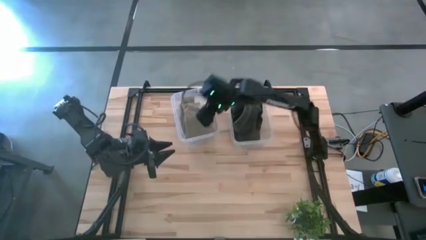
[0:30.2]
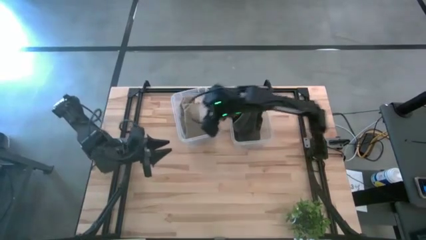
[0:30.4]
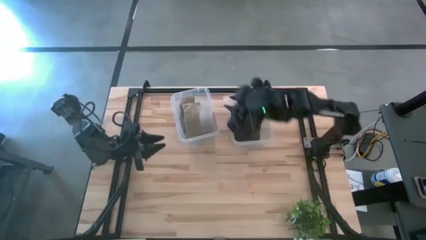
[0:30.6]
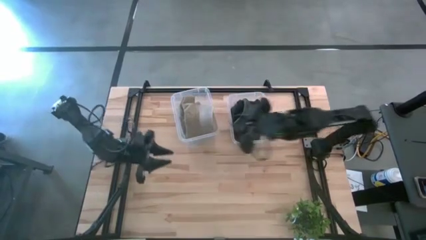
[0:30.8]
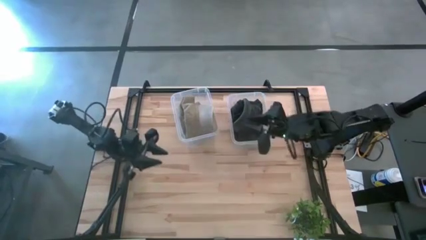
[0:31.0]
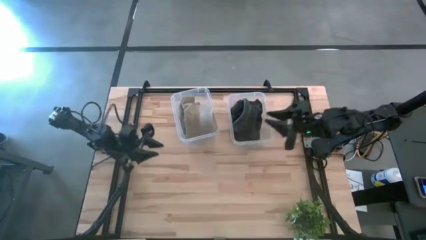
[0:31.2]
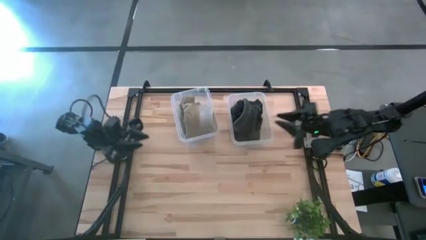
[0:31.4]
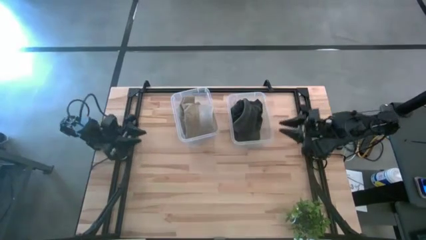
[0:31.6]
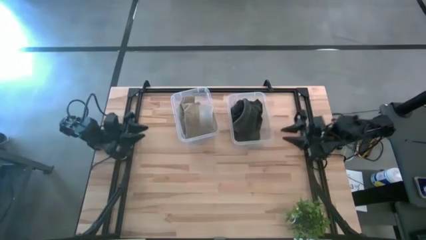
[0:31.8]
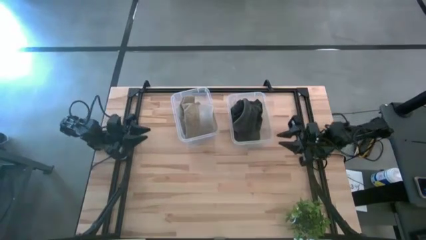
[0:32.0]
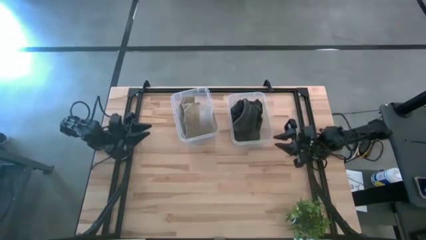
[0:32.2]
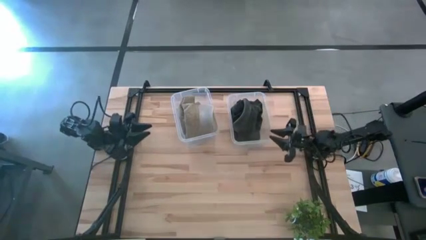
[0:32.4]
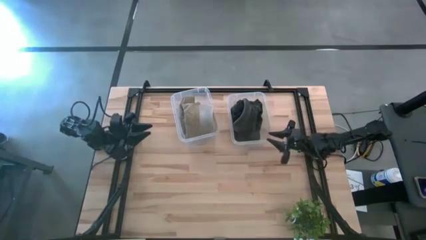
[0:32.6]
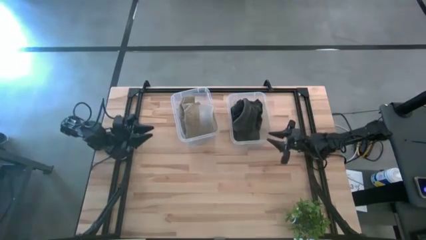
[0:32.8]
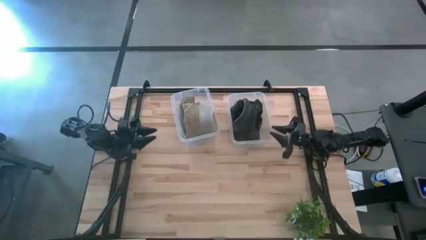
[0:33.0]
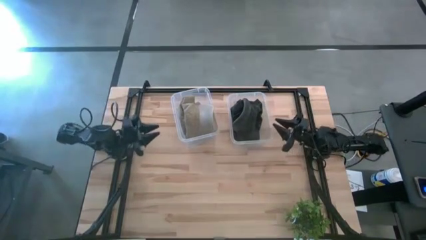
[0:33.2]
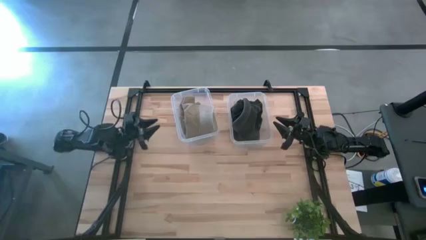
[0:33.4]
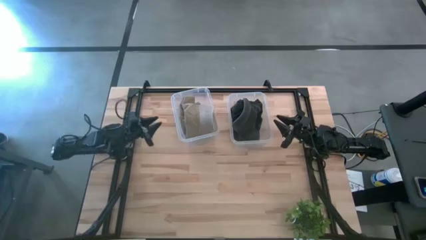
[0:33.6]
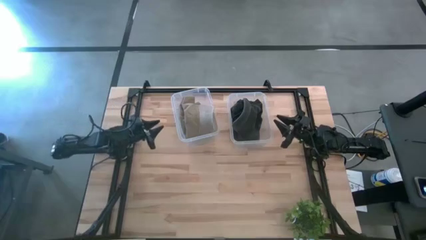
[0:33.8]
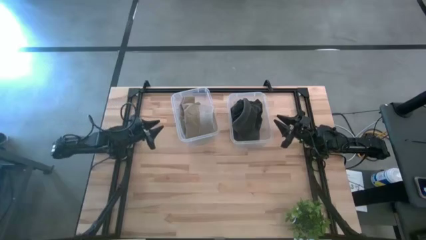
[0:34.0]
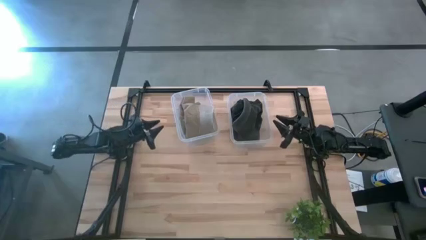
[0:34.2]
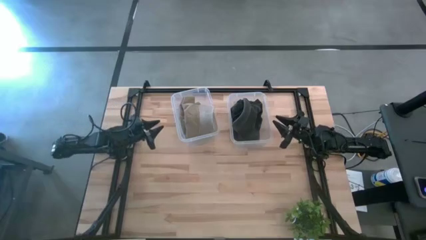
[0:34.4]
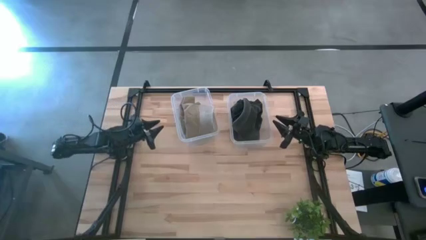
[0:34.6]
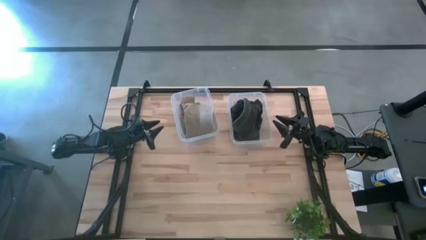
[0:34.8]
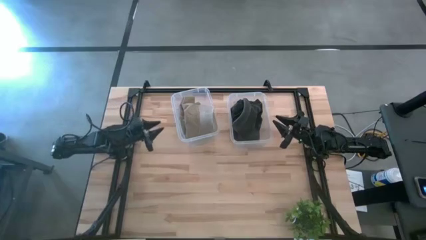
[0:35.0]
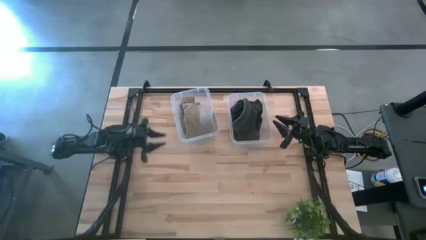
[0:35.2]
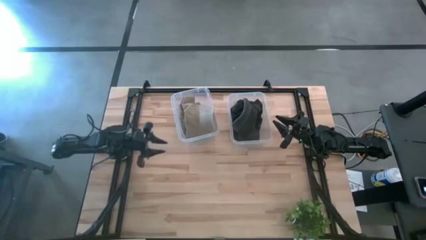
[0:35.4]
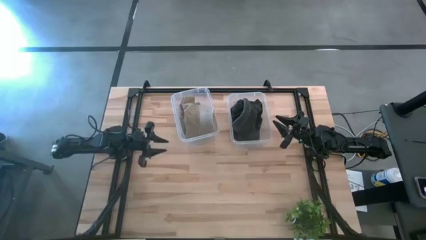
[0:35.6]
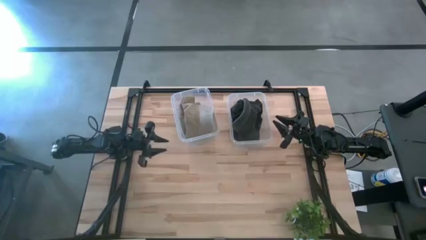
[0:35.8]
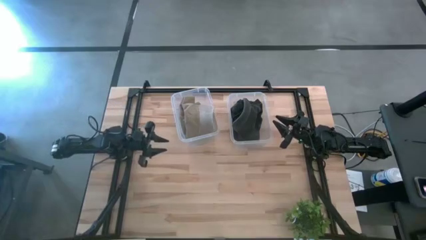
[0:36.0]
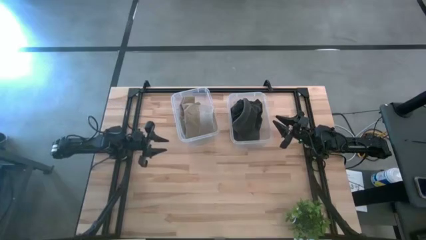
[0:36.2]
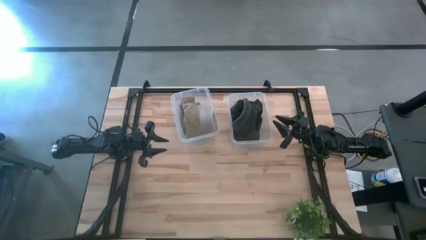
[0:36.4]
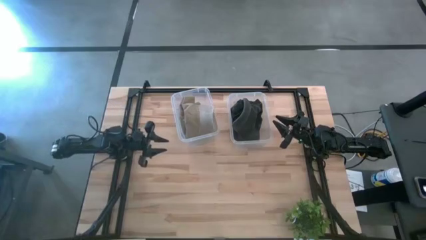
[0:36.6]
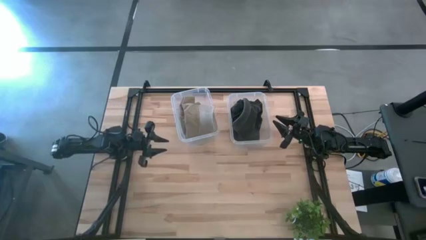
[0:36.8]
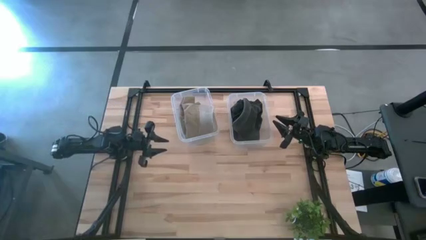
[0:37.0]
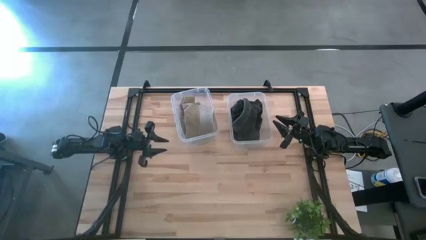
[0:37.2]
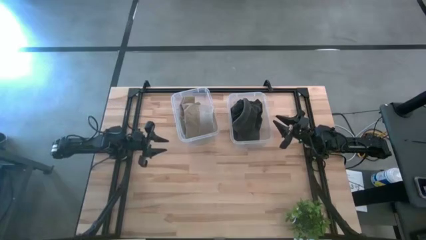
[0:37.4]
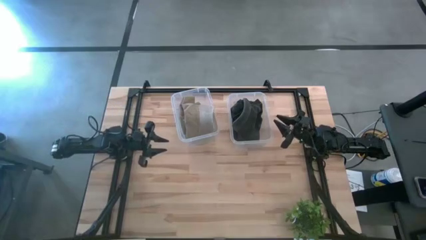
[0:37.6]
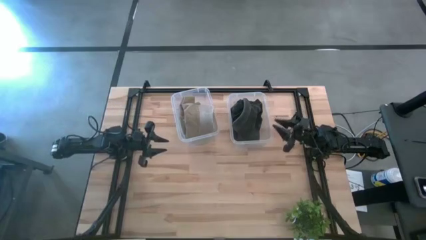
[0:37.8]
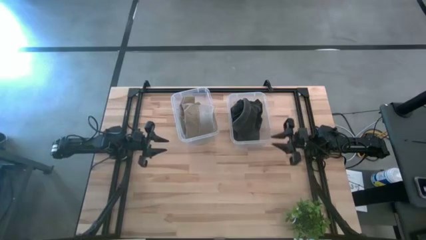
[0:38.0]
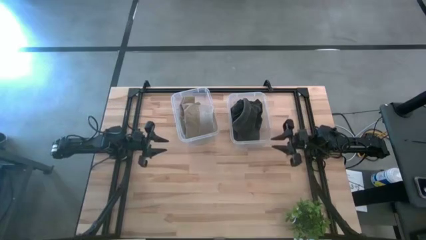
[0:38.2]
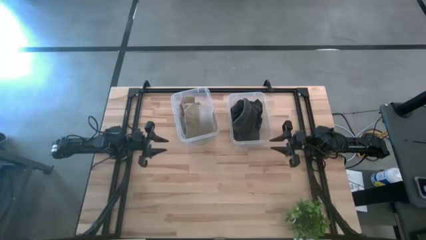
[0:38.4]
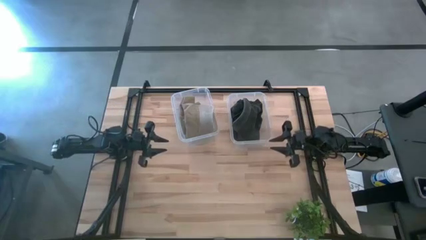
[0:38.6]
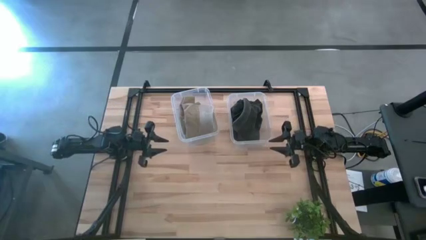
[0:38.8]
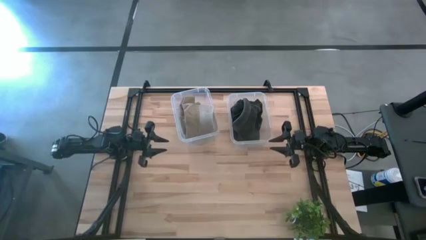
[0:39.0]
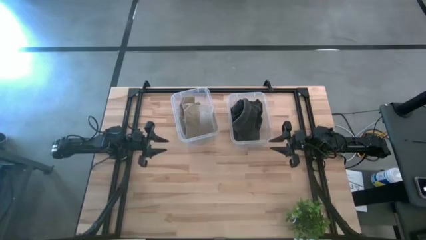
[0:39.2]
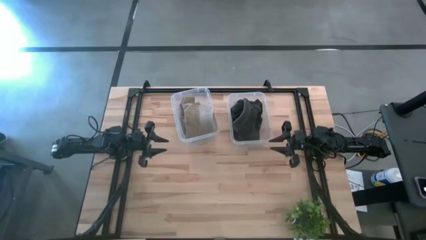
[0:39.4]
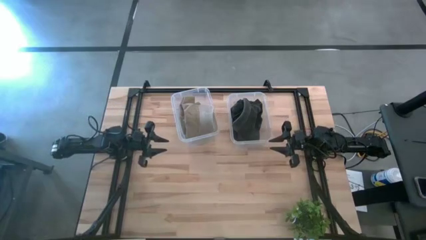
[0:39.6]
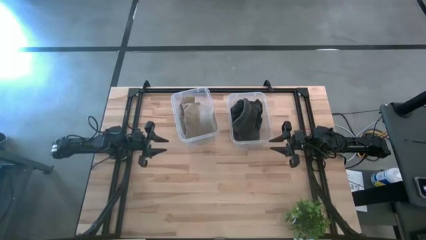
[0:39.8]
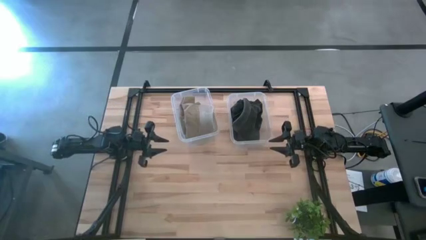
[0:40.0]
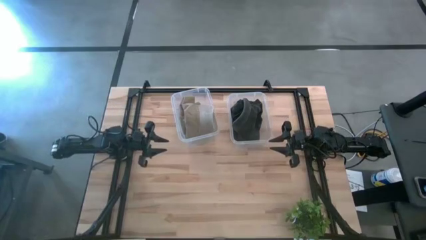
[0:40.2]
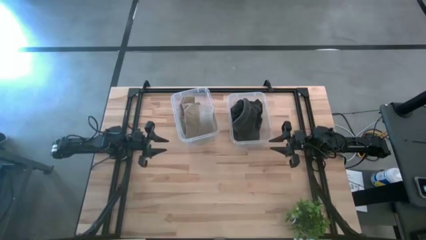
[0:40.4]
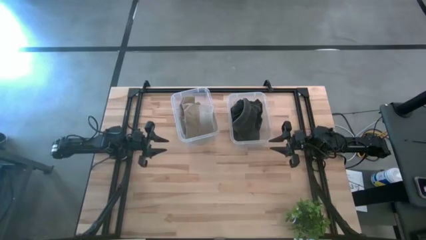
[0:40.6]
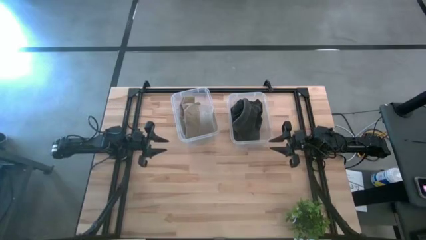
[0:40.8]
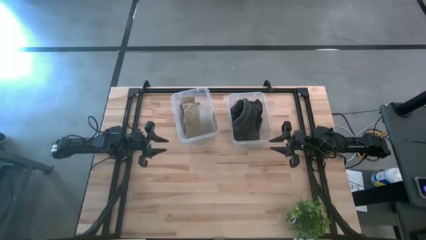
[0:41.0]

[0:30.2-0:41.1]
Task: Pick & Place hat
Return to Home Position

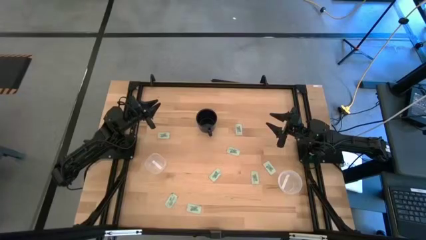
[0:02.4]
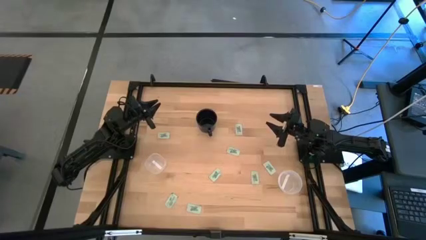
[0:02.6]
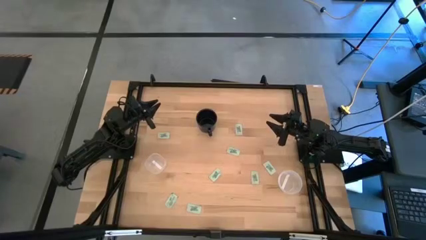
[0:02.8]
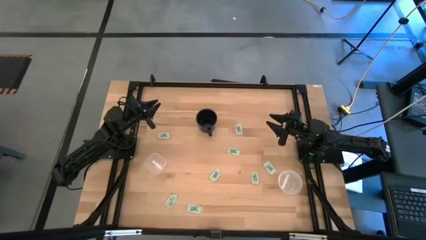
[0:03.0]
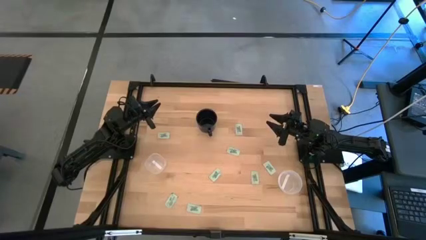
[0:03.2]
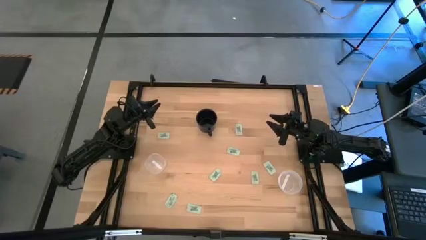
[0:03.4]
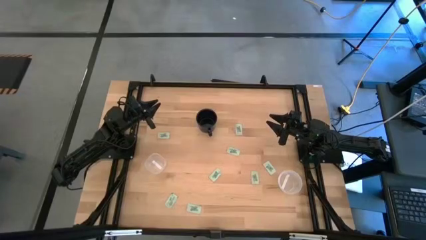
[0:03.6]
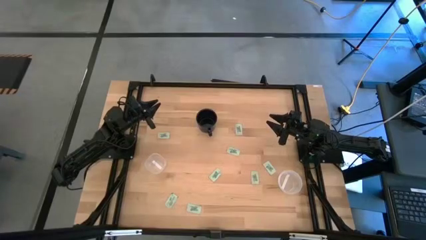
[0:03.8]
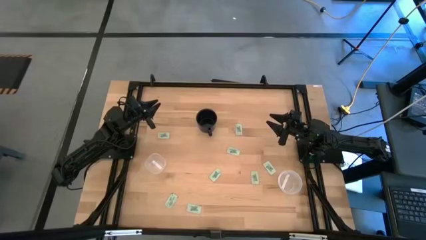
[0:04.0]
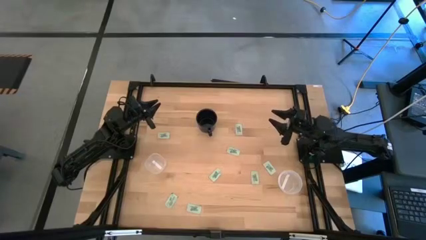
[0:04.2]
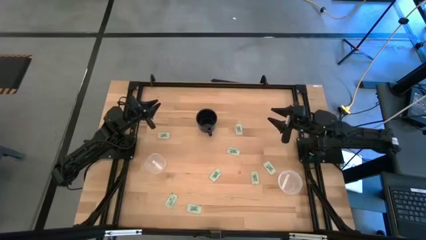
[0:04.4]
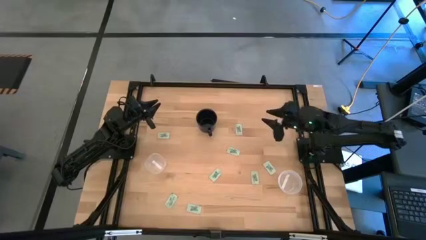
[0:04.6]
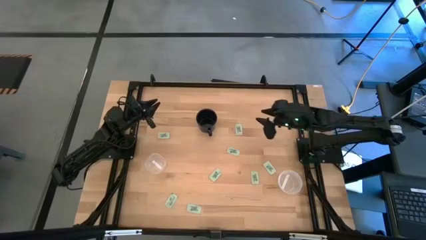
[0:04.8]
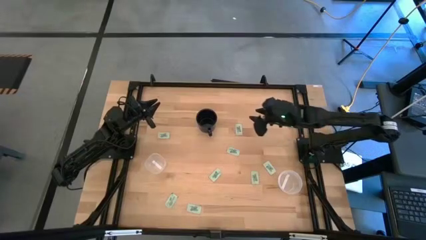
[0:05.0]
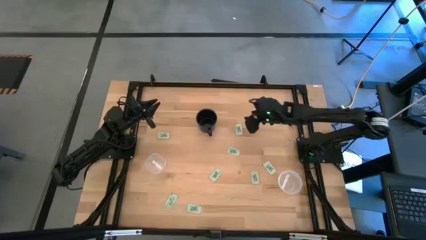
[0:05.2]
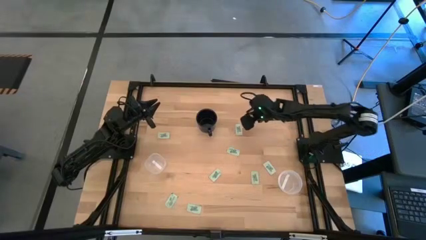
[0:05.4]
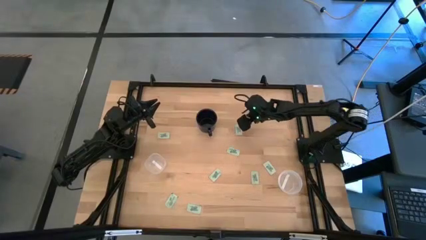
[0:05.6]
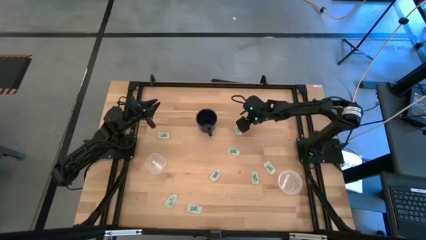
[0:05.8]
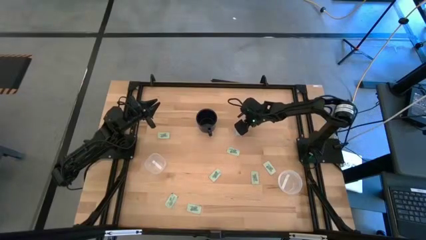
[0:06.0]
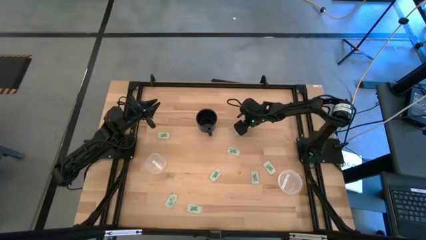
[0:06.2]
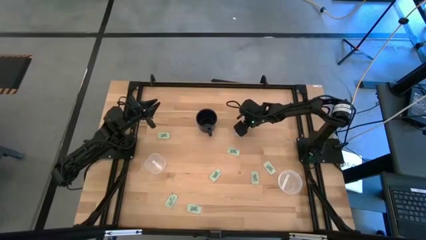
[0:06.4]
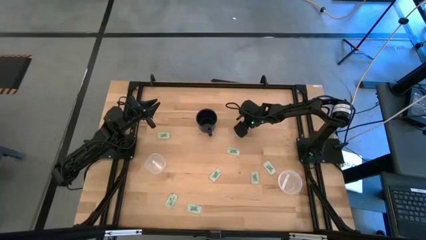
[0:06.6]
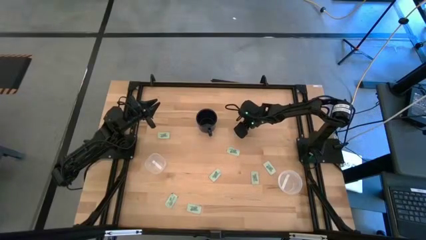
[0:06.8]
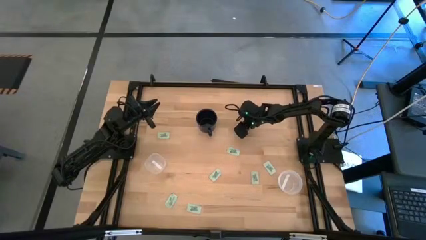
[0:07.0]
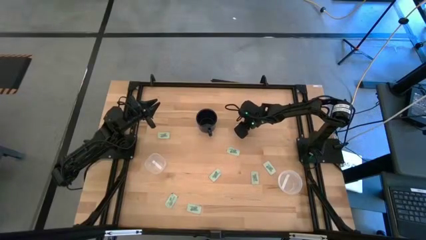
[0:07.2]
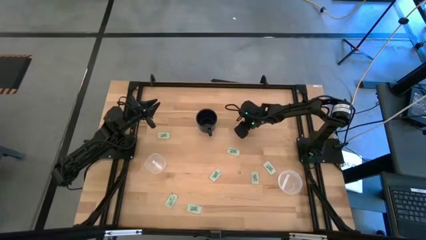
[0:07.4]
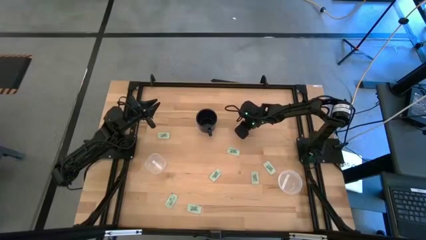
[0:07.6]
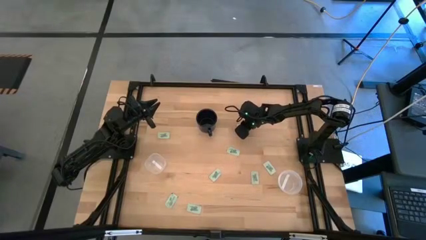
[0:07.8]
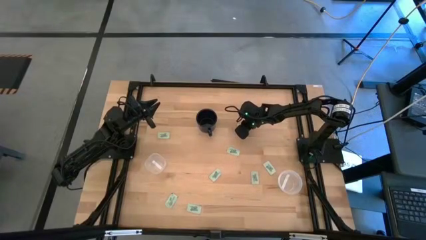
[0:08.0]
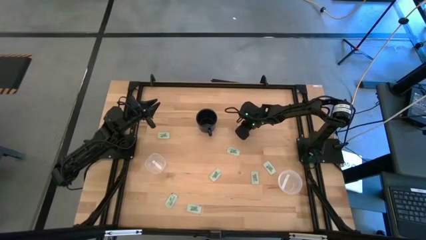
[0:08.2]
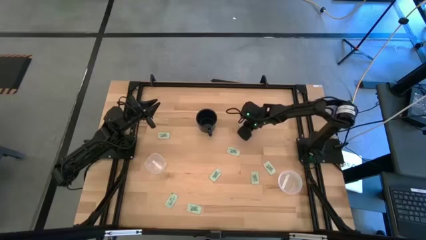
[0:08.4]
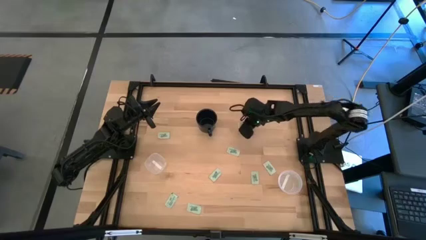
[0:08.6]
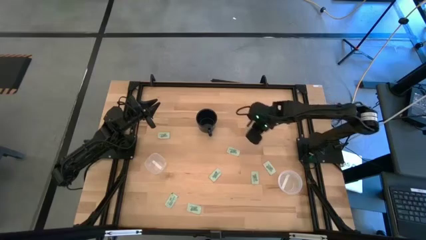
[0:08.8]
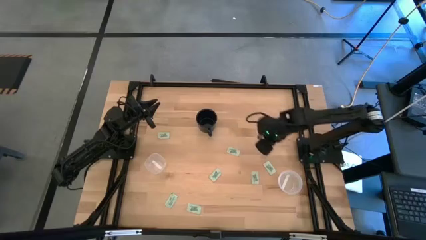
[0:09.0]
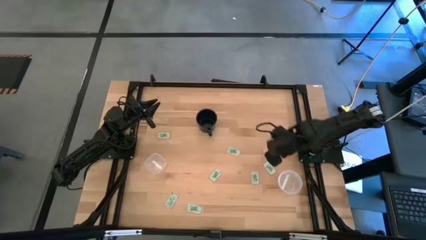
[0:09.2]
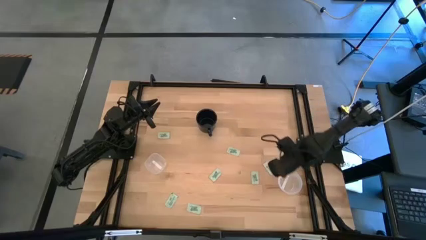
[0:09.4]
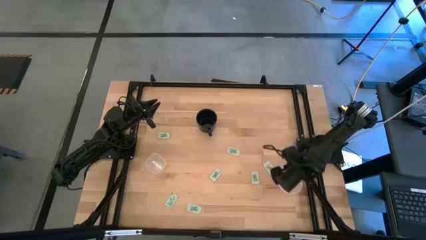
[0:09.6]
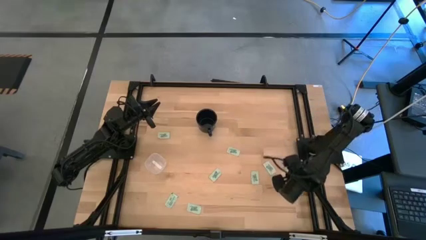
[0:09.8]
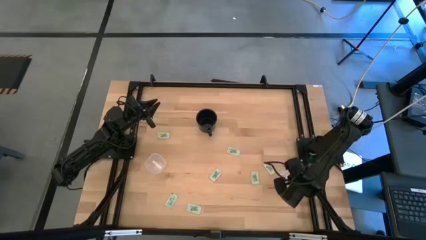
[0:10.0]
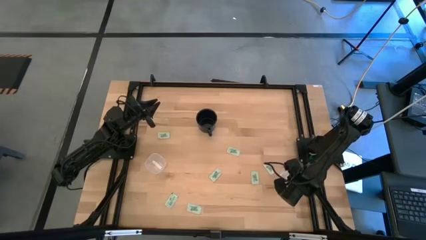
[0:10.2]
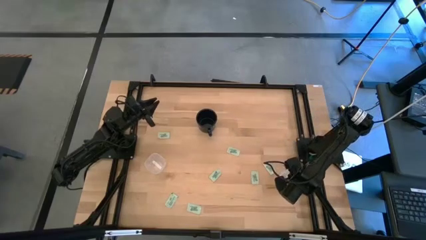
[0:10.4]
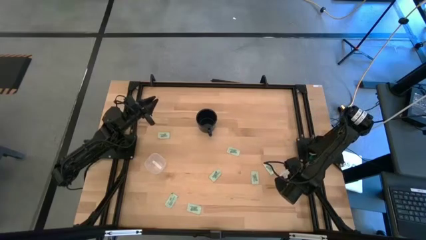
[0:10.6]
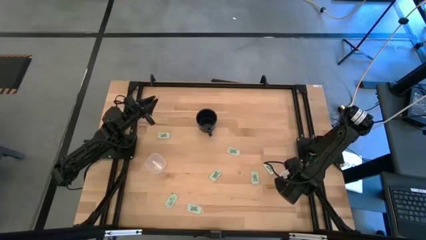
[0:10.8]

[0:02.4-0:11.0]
Task: Pick and place Stevia / Truvia into bins
Put the stevia packet into the right transparent container
